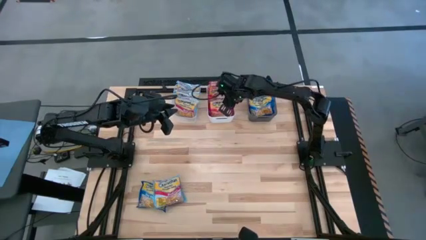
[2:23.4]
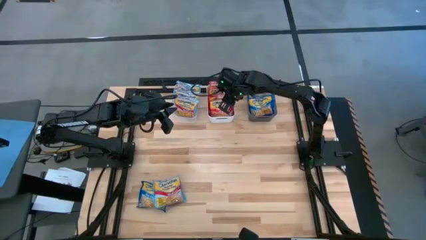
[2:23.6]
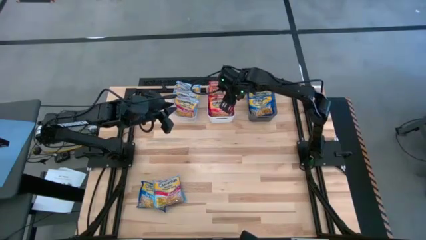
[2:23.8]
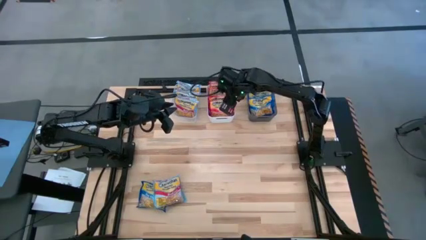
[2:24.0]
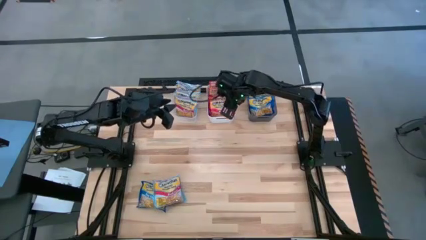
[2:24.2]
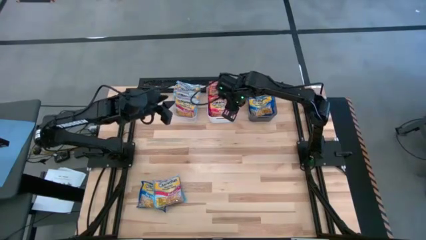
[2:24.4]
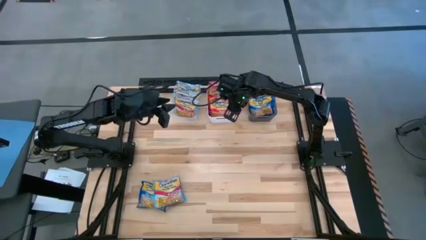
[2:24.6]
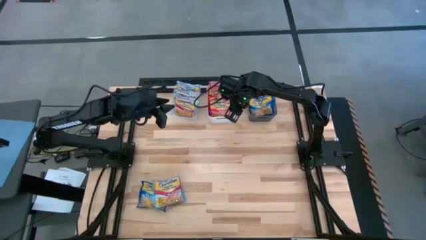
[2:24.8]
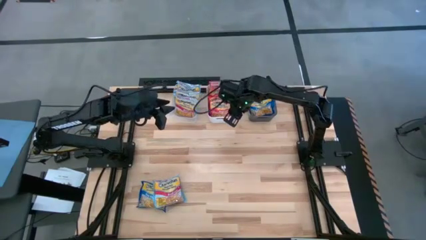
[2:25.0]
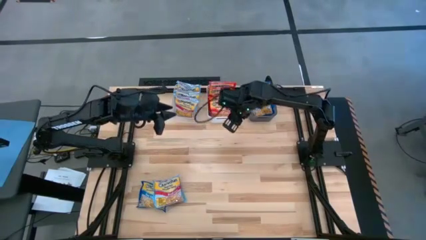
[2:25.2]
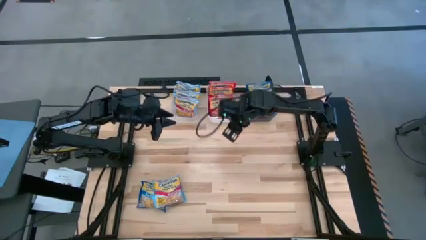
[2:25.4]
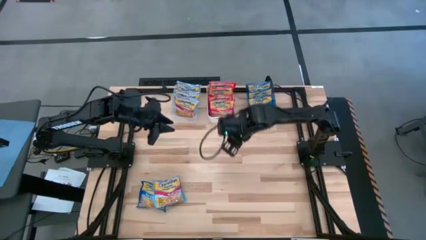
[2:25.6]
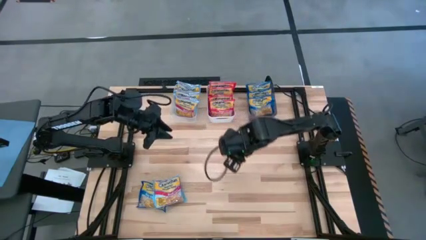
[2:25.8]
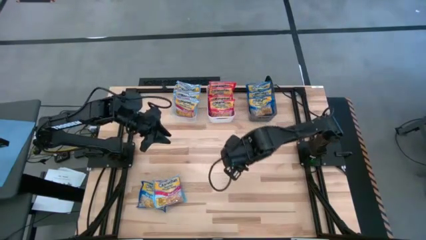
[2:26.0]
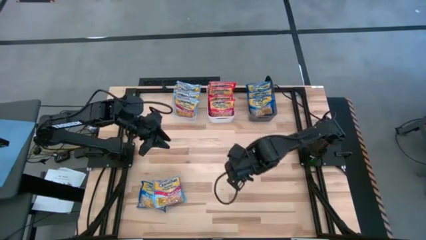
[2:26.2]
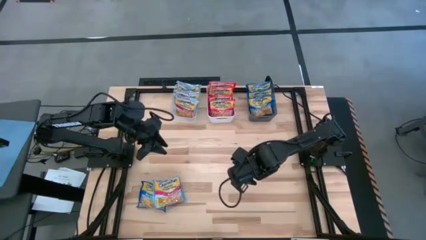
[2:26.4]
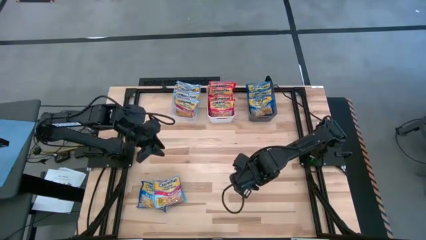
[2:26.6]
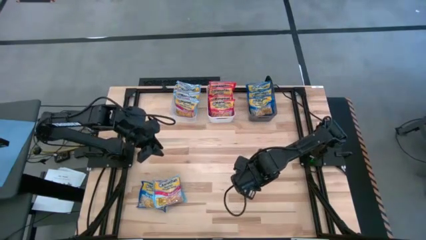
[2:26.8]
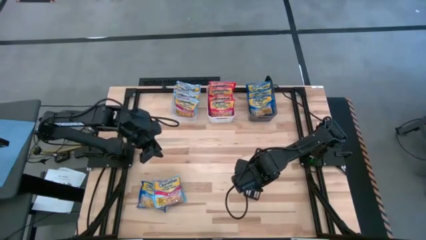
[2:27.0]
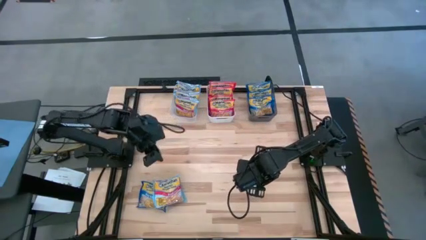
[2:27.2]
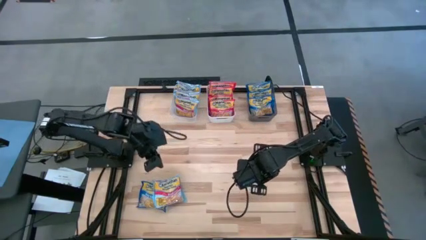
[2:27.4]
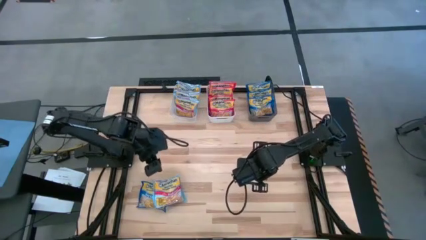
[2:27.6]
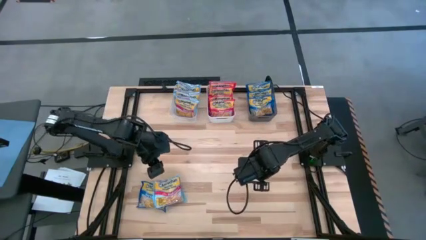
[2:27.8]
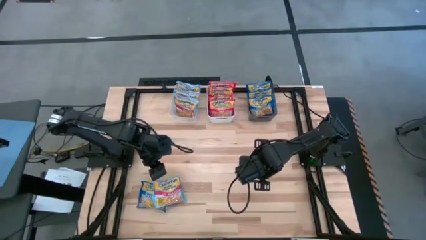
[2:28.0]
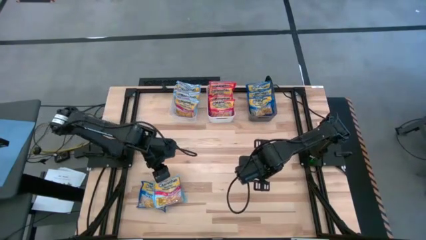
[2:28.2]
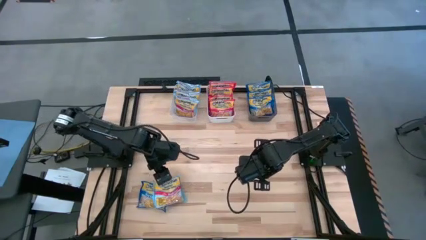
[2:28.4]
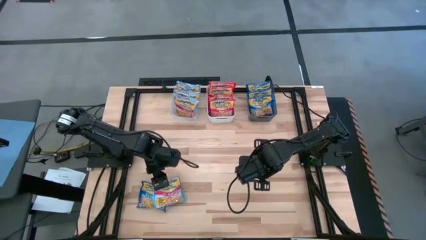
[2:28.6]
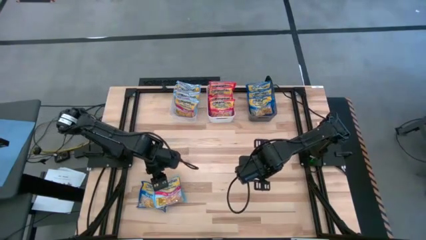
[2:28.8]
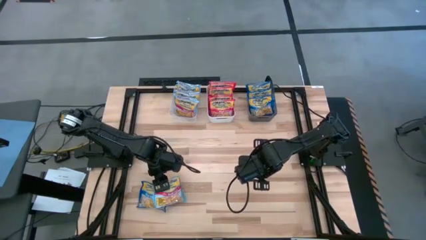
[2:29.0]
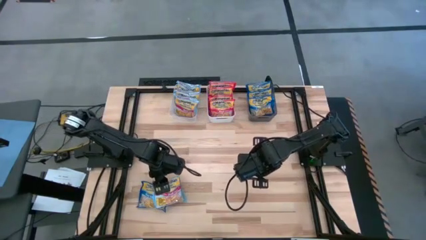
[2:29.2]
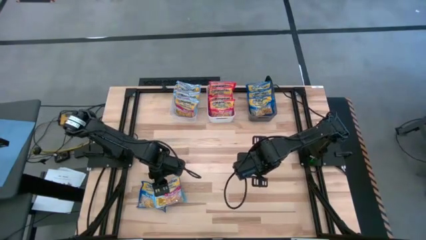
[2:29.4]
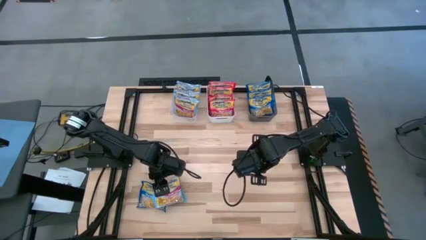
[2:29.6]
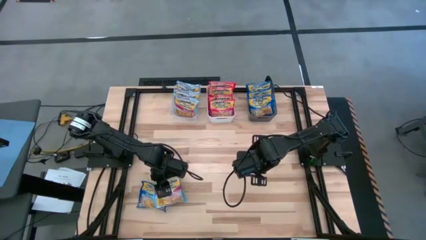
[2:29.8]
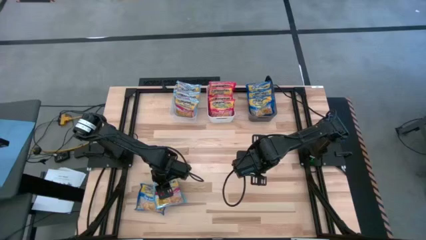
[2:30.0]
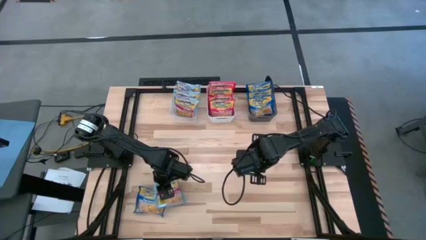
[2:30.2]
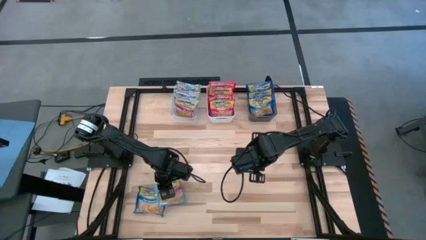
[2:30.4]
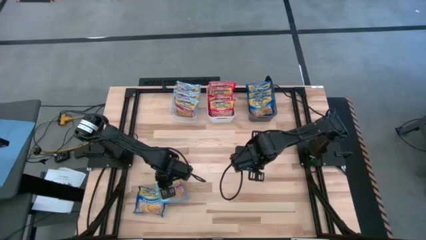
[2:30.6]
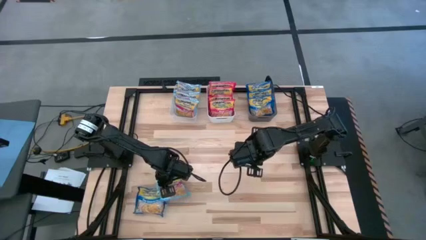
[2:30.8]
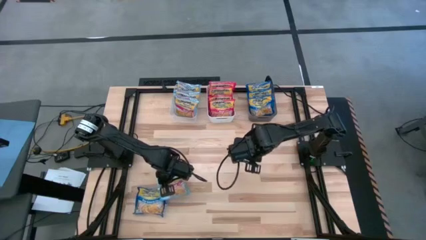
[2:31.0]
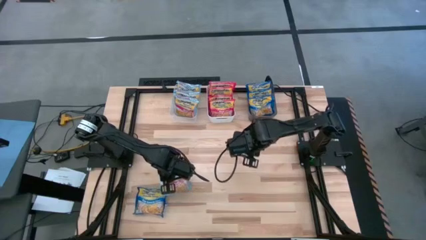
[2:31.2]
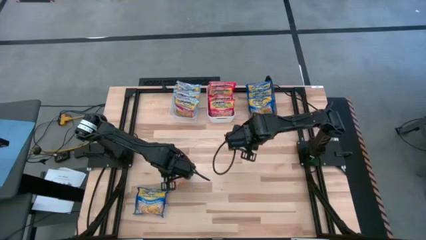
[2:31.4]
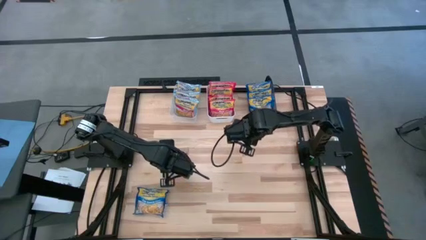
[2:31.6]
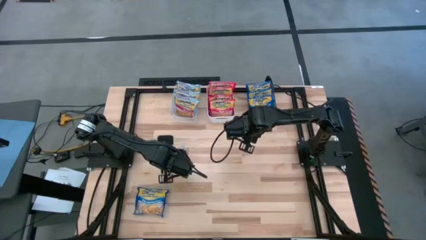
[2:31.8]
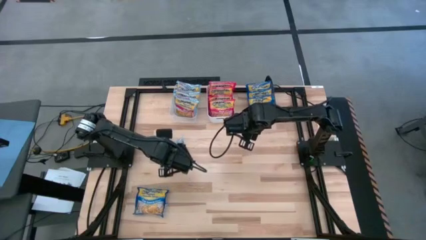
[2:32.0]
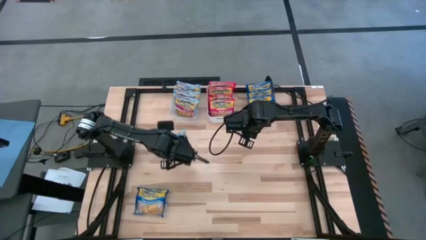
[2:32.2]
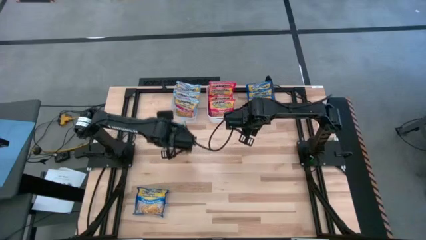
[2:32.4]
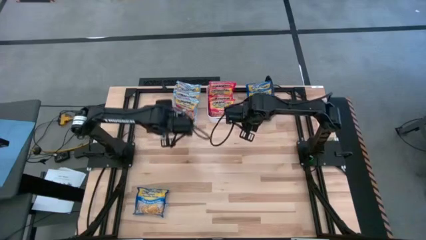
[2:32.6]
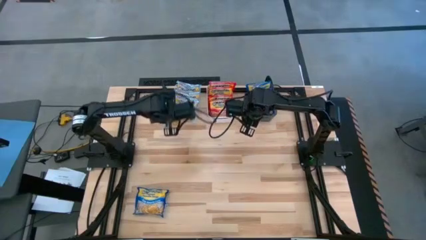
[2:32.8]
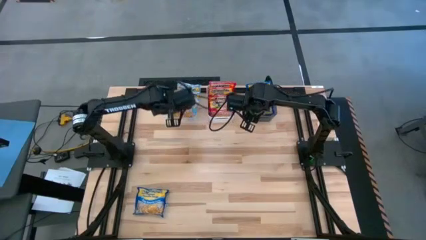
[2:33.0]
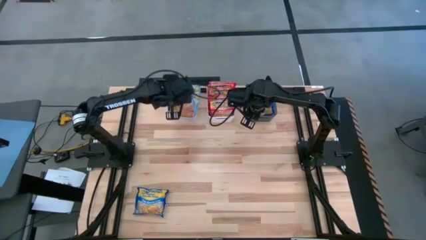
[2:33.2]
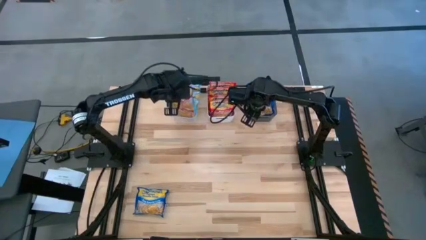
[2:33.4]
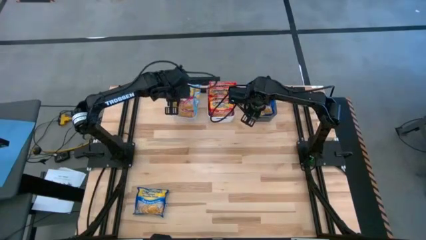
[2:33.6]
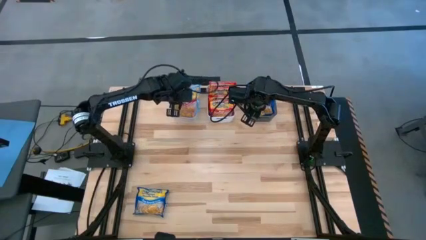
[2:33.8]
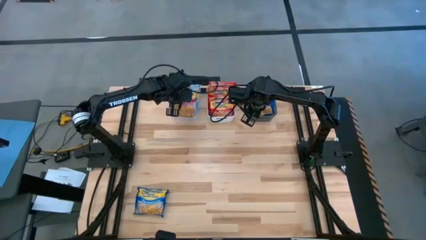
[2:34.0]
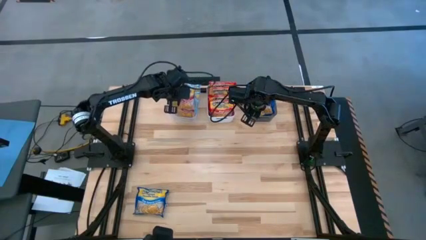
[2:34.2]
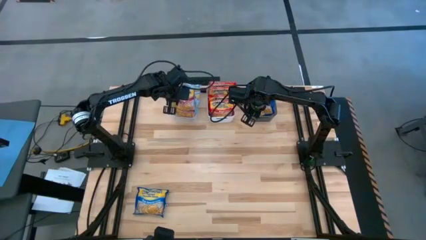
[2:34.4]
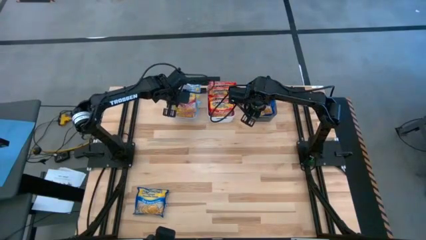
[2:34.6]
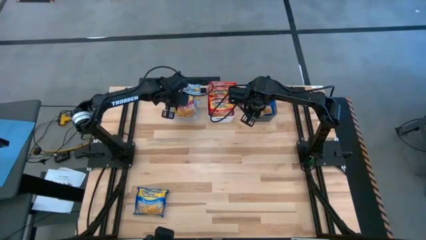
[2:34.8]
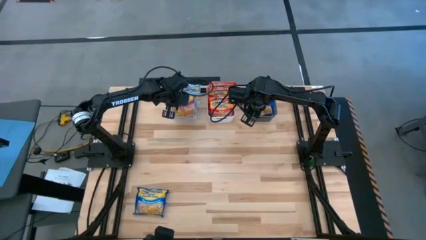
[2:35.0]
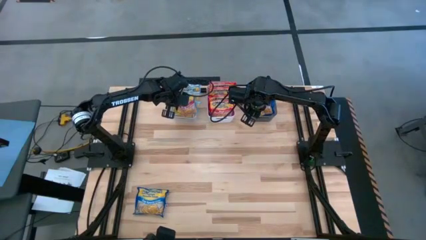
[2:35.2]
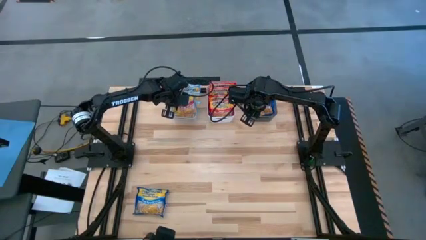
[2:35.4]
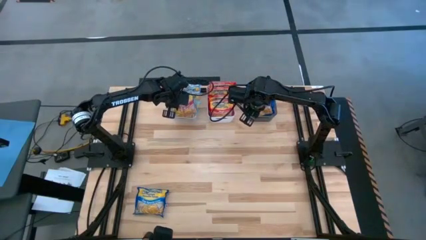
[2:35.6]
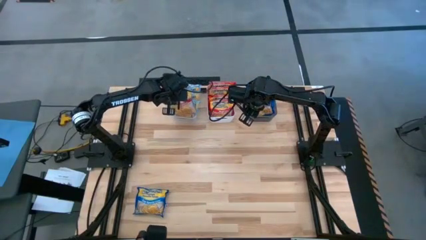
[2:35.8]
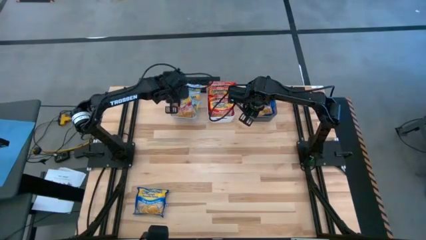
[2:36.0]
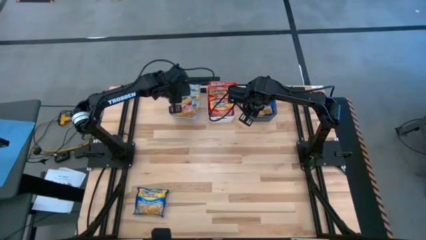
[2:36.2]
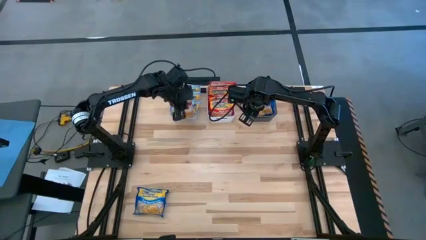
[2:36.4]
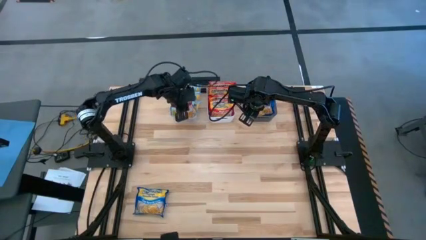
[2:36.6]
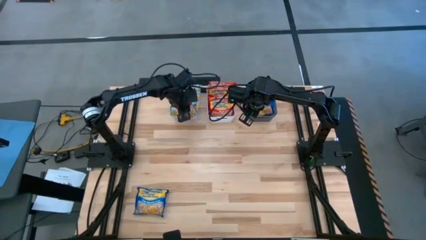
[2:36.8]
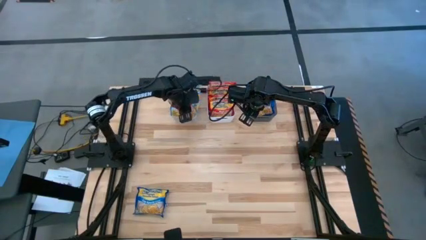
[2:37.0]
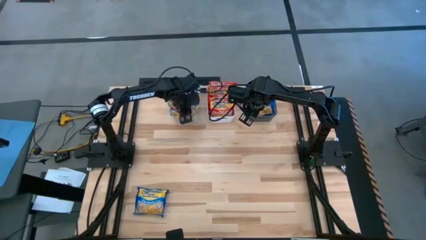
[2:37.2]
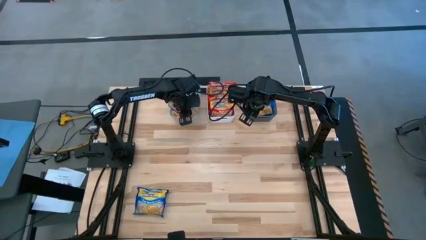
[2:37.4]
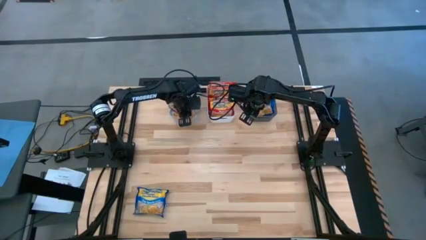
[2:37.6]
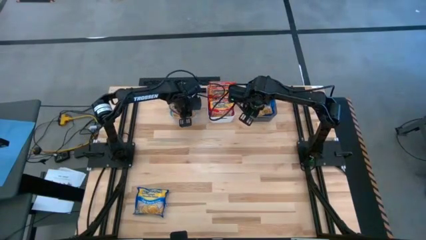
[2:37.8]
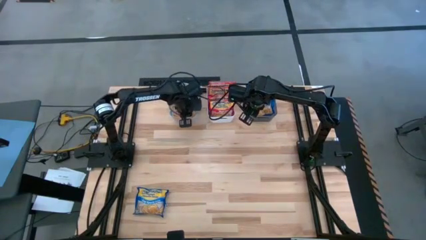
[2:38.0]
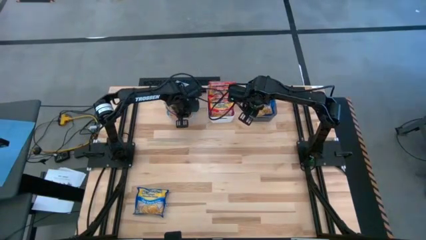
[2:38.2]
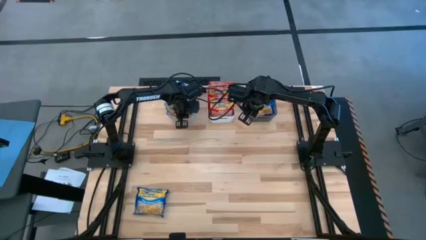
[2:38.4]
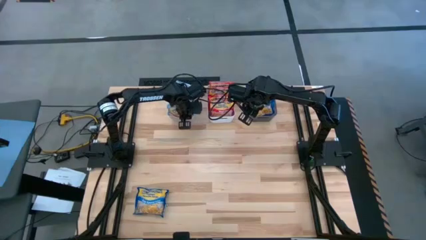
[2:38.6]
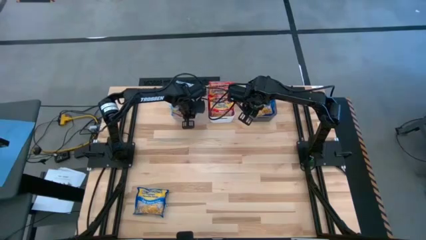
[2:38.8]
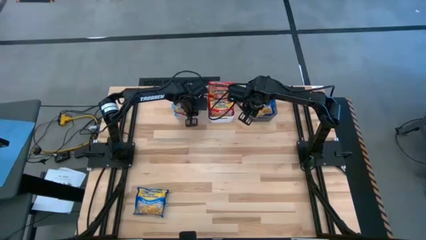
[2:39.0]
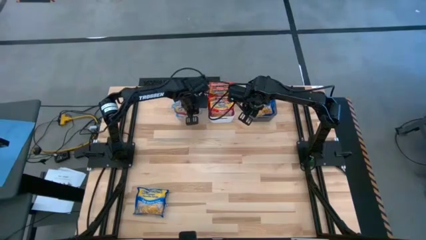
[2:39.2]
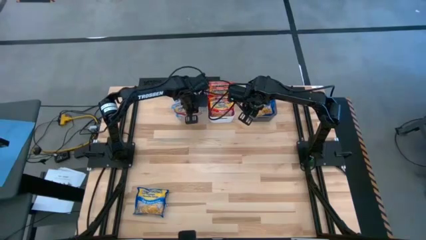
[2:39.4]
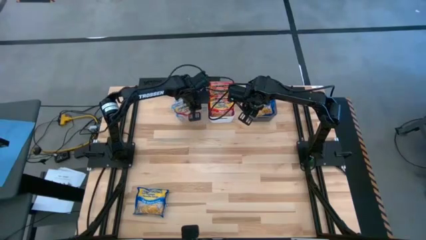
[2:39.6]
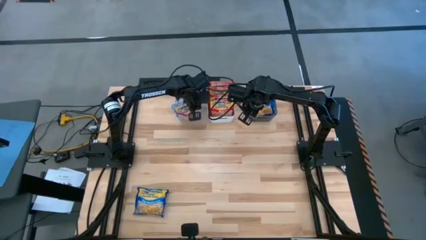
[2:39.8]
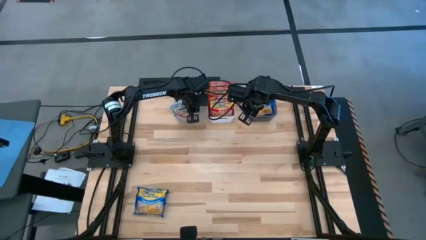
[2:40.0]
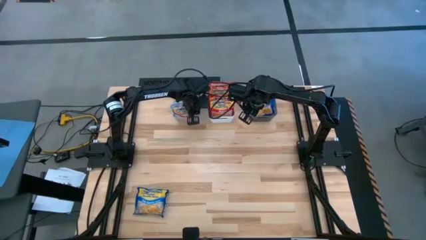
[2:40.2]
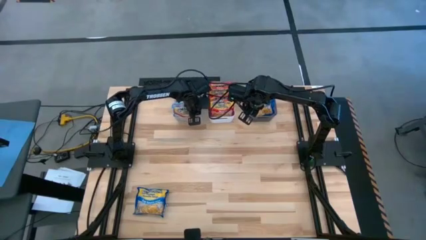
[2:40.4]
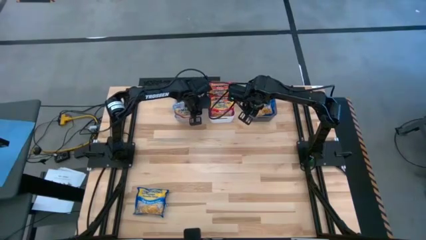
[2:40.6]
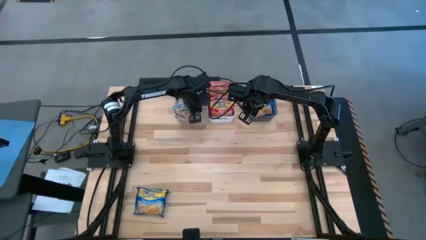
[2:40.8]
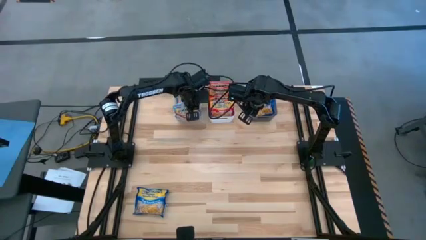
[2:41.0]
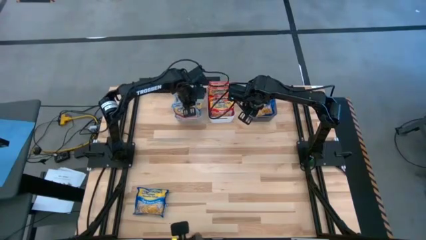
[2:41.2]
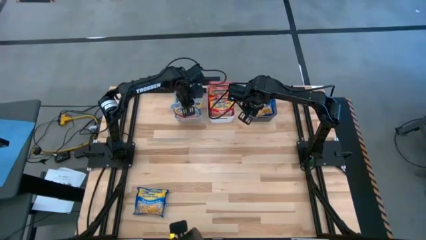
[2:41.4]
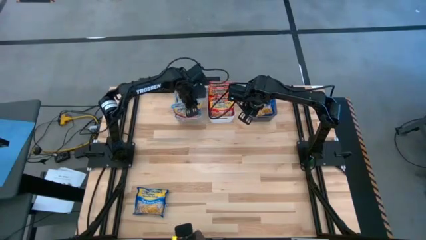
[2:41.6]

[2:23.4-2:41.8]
Task: Sort Maruchan noodles
Put the light blue bag into the transparent bin
